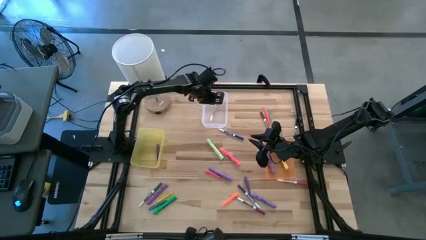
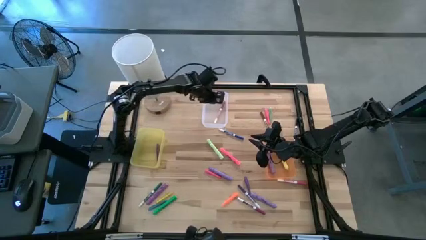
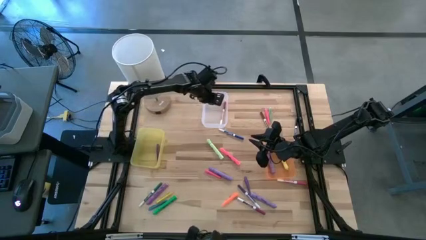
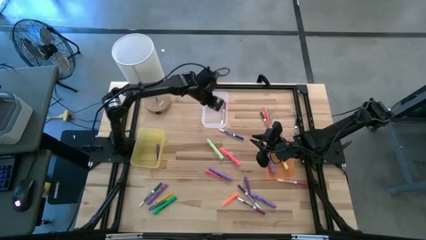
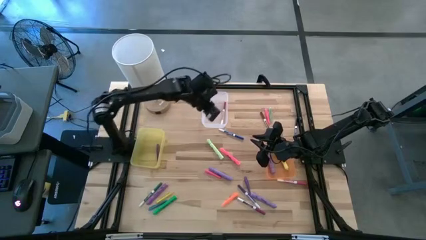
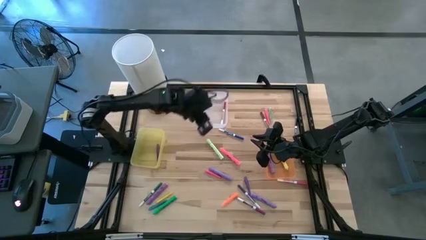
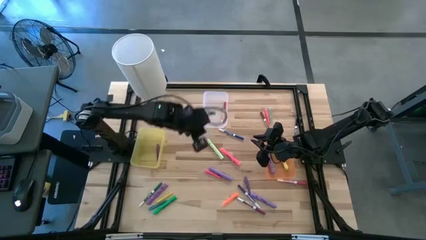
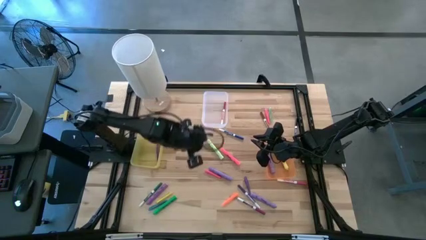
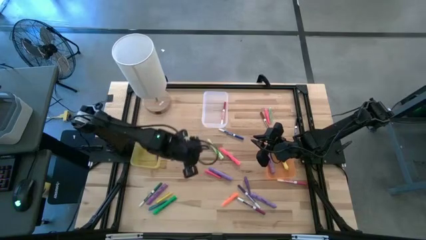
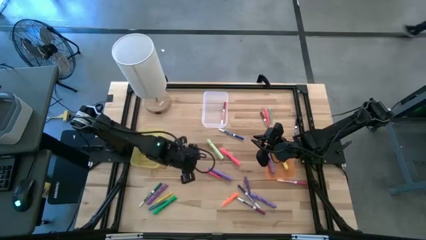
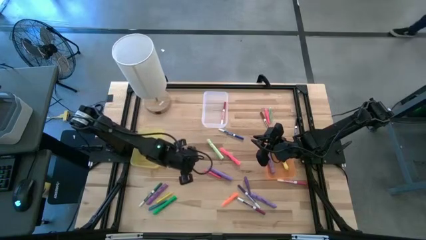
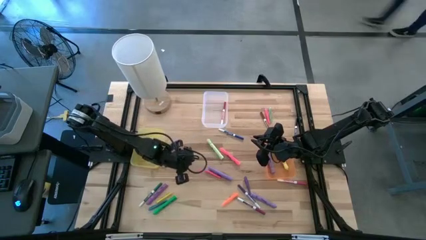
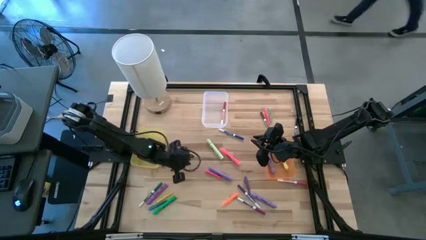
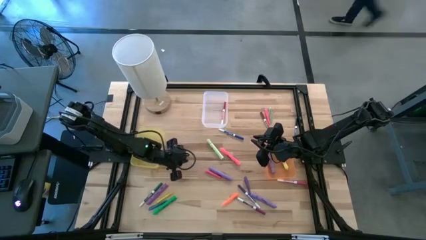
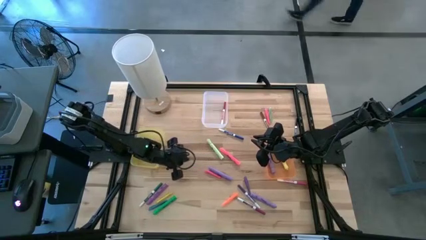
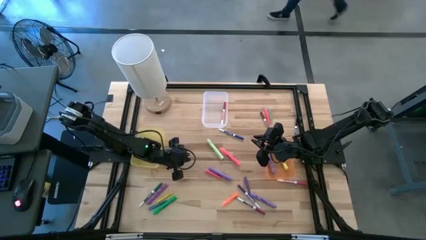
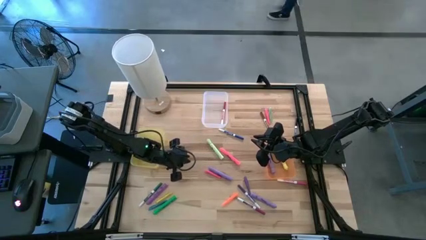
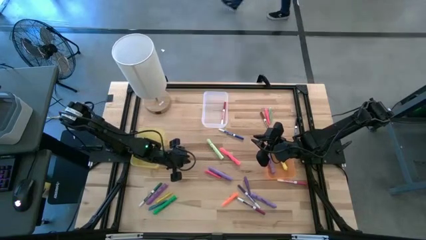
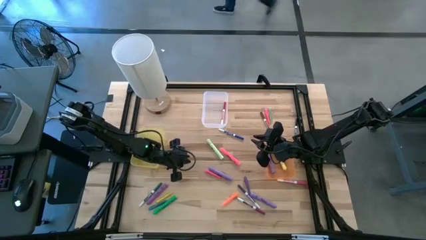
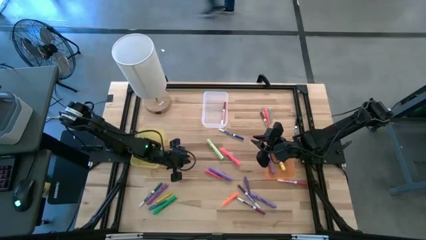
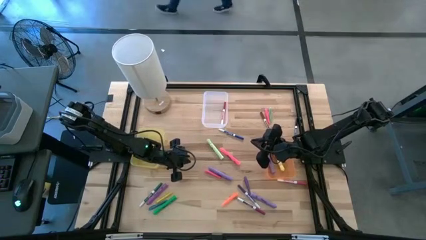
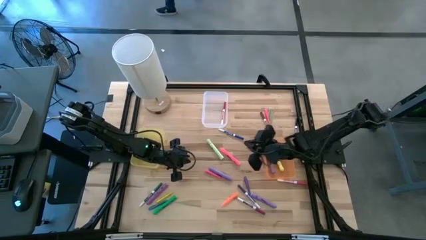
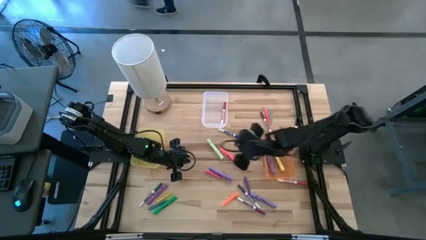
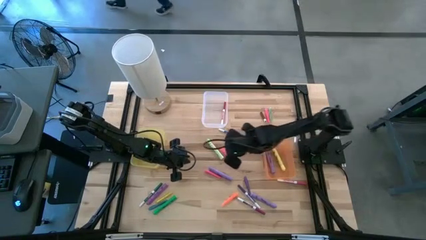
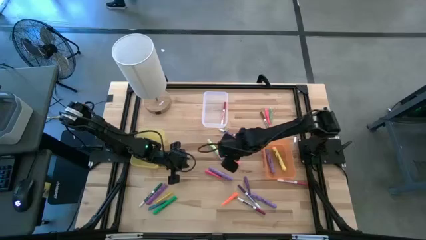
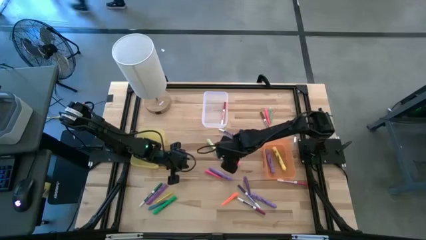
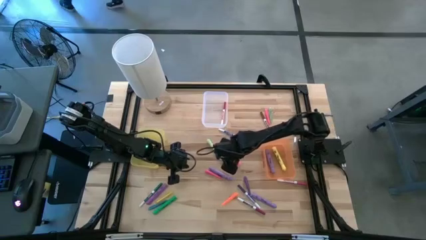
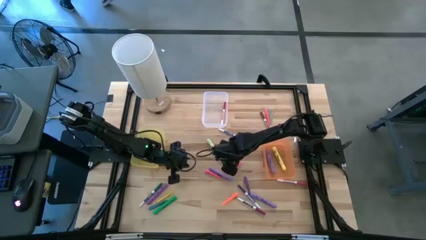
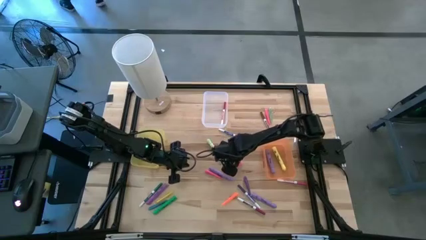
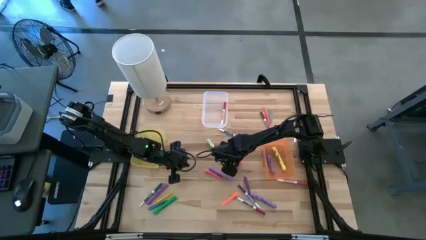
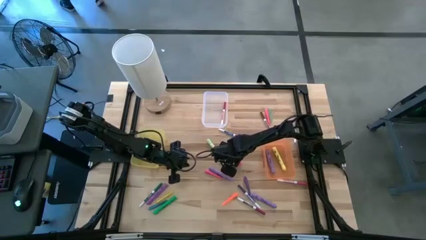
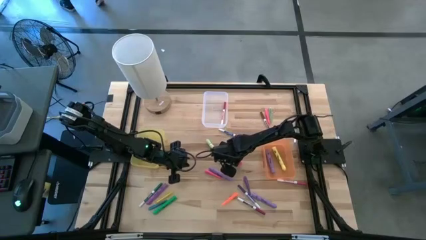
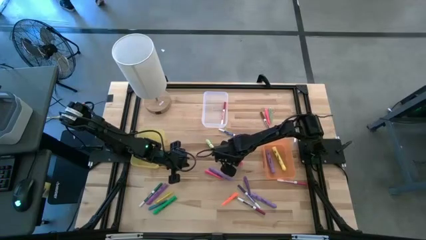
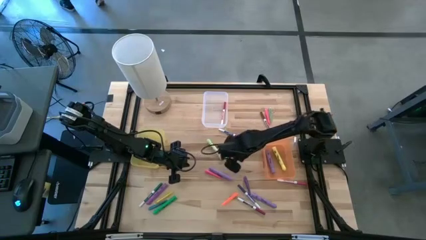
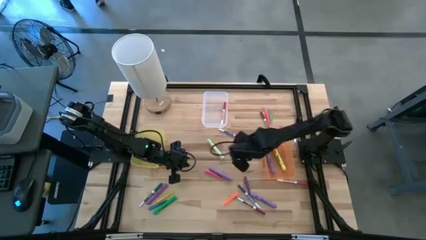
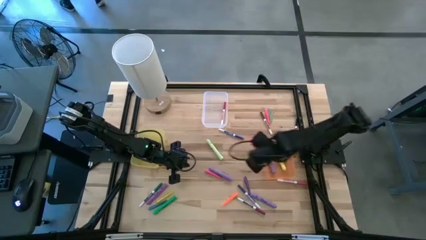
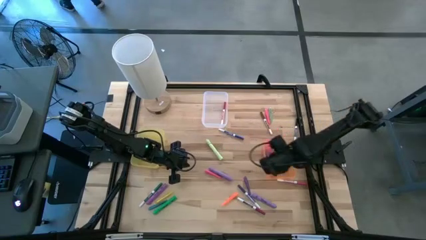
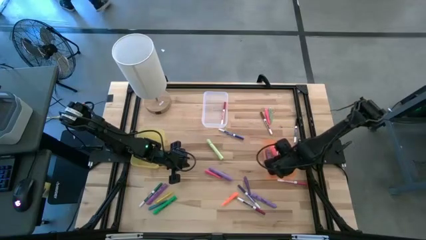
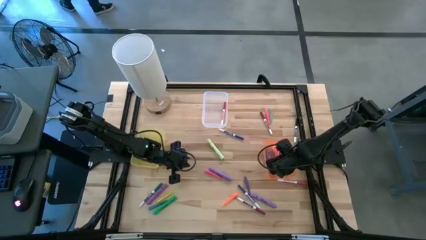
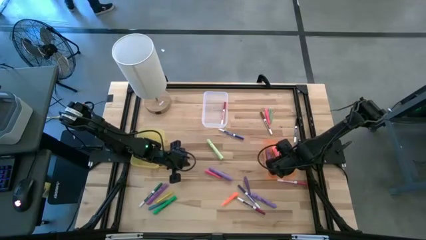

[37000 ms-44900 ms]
Task: Pick & Place Markers
Put the pink highlighter pen into the orange bin

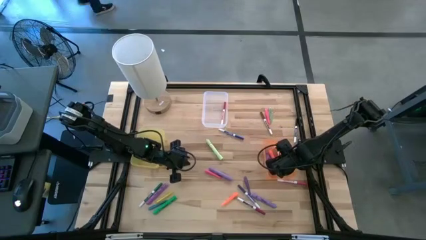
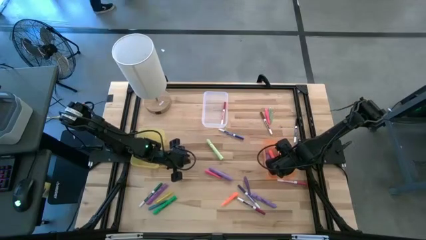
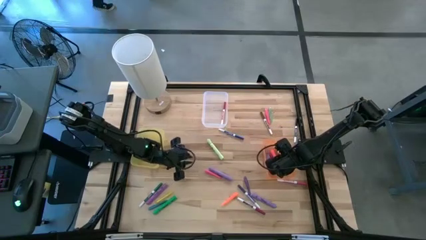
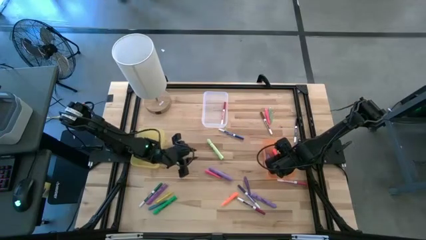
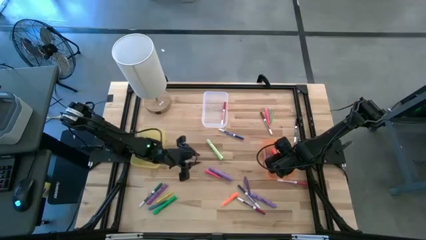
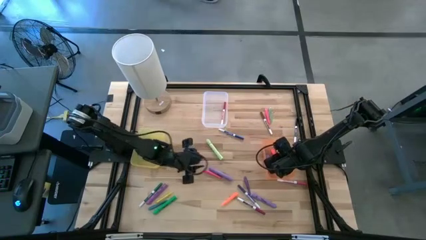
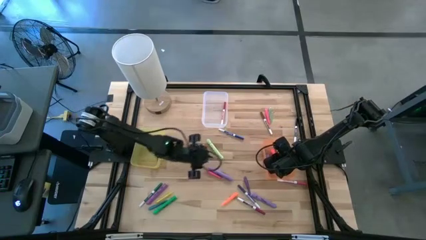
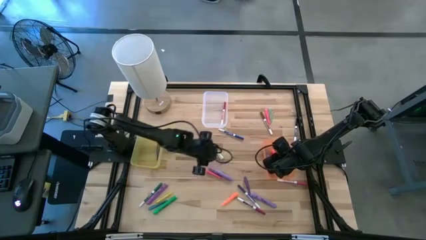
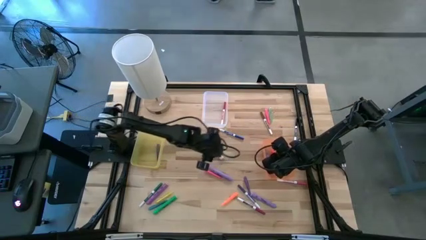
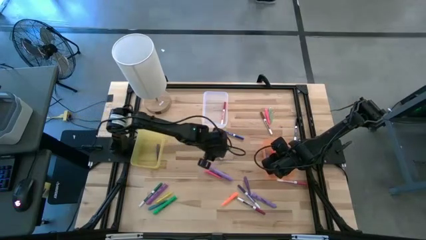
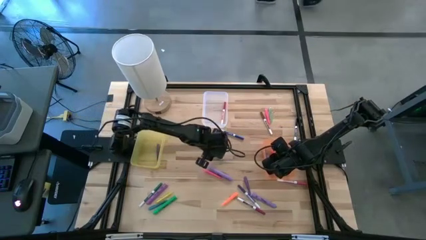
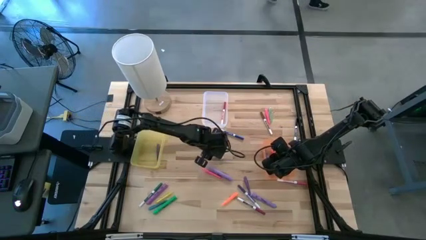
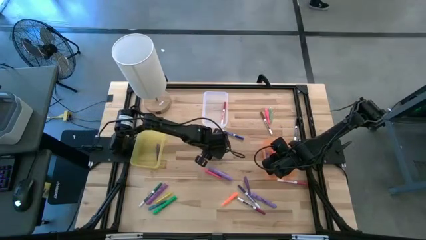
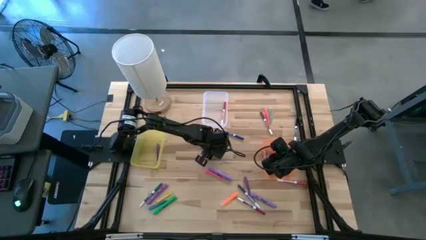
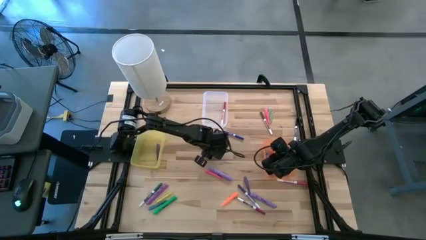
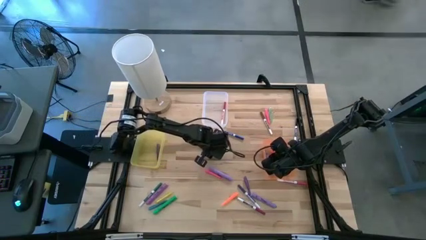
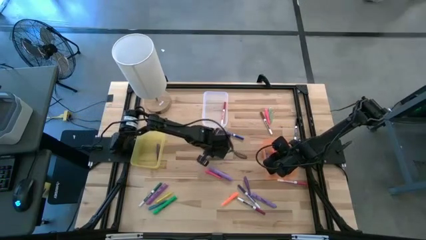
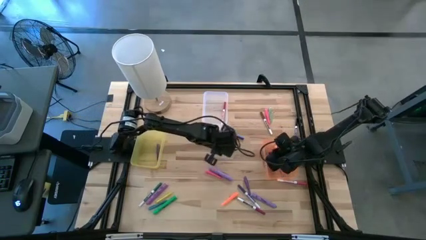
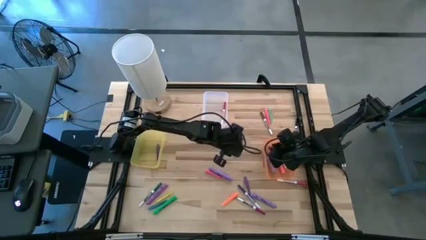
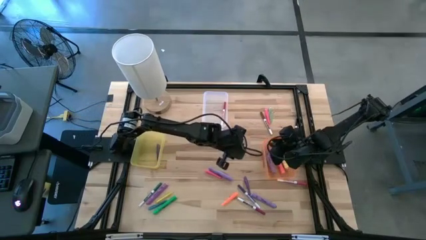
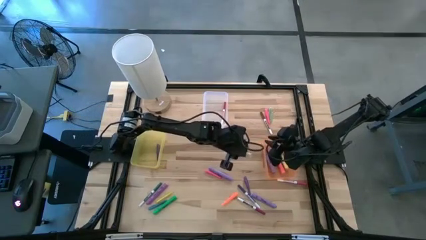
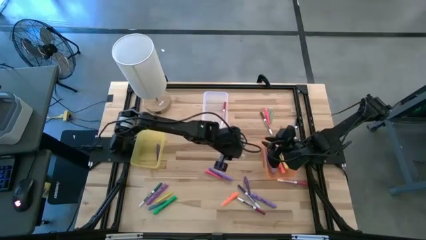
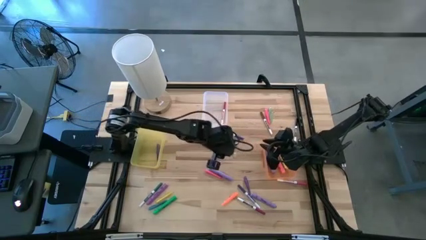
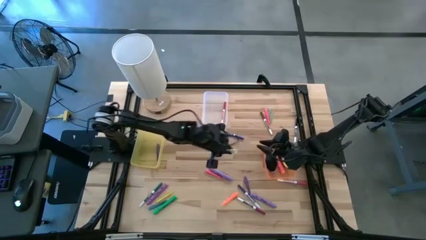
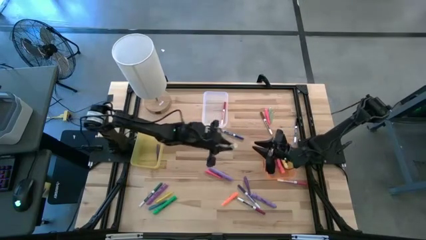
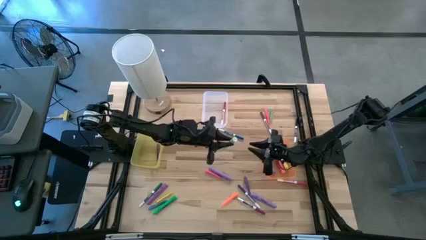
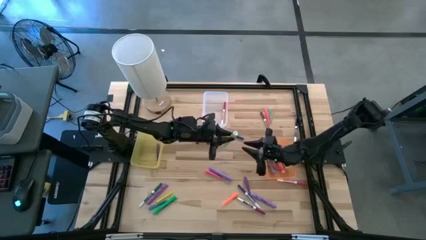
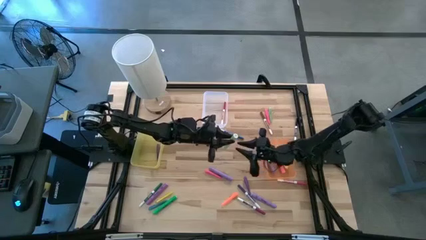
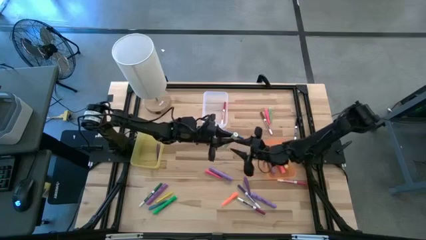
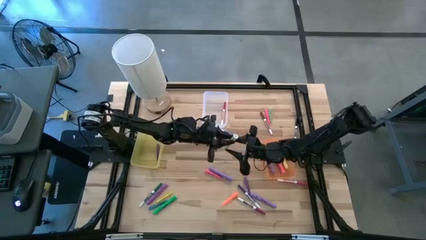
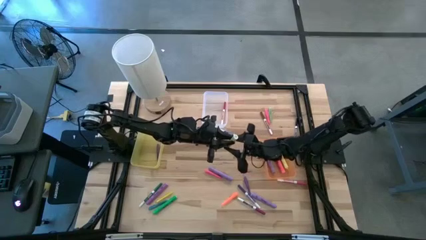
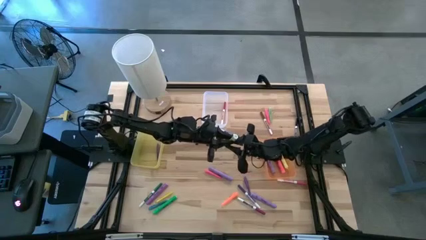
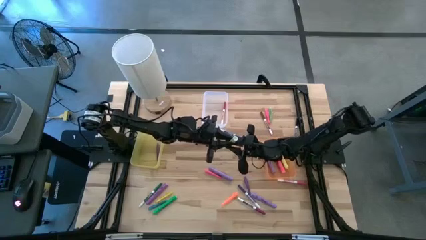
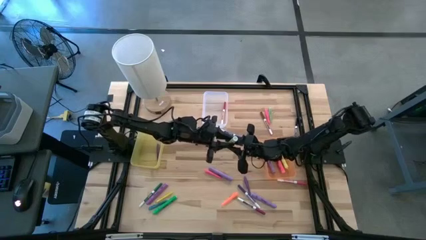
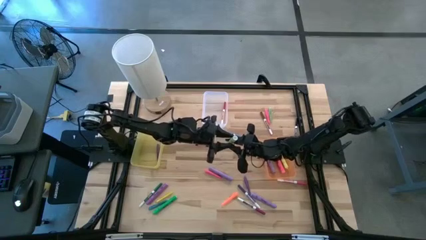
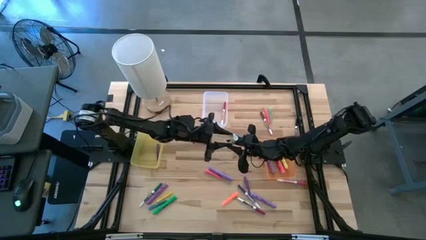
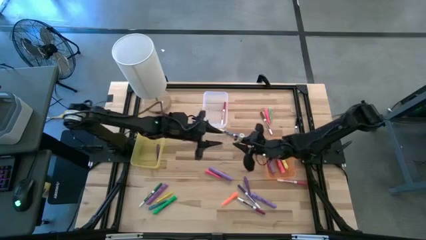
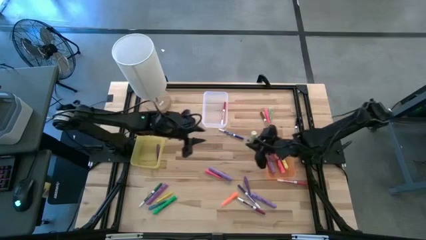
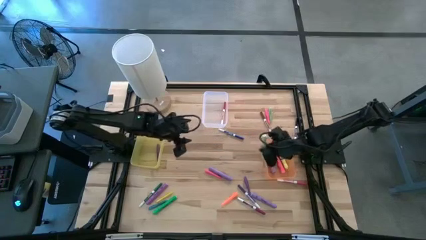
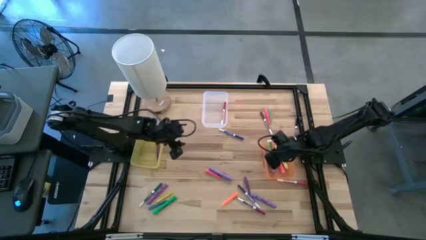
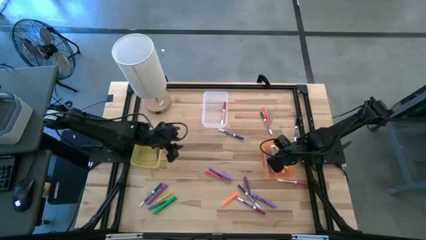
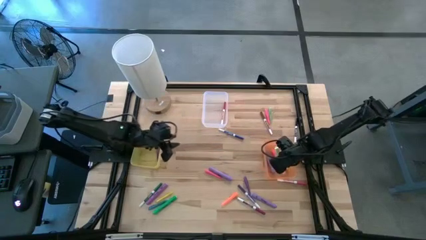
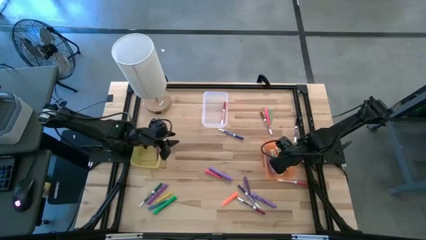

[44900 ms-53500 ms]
Put the light green highlighter pen into the orange bin
